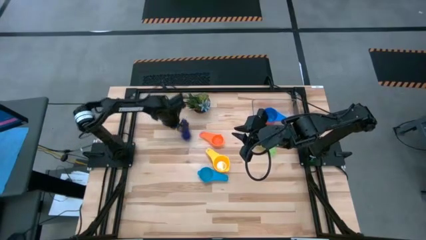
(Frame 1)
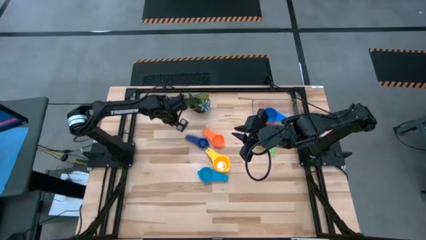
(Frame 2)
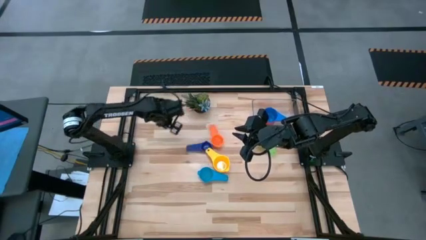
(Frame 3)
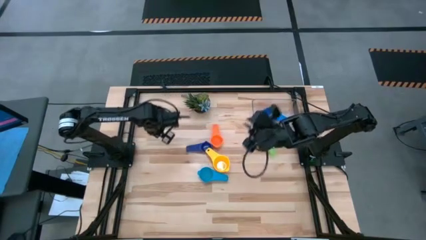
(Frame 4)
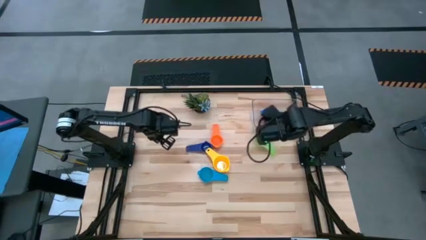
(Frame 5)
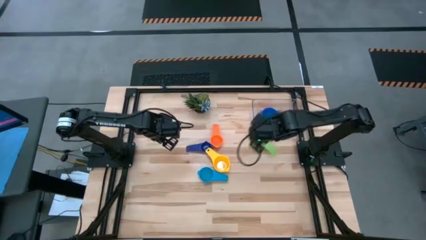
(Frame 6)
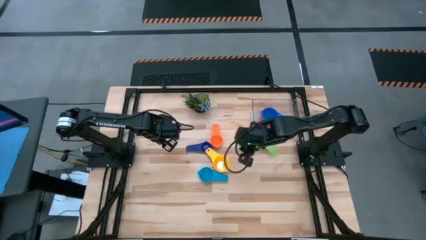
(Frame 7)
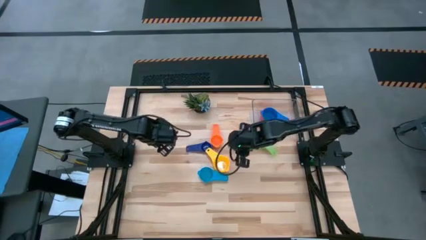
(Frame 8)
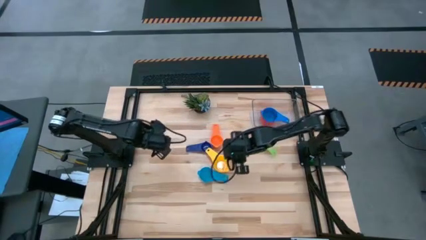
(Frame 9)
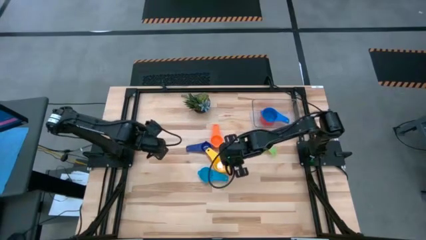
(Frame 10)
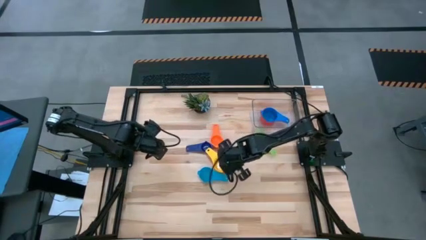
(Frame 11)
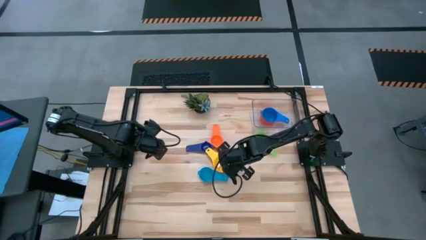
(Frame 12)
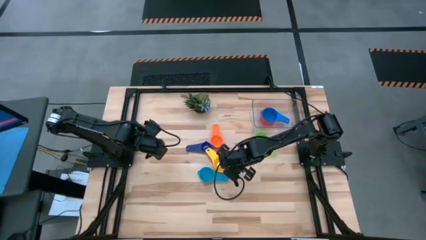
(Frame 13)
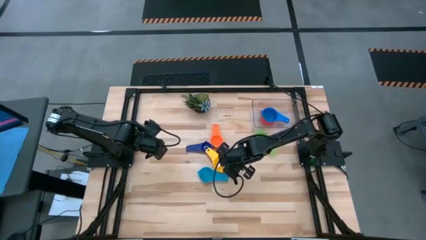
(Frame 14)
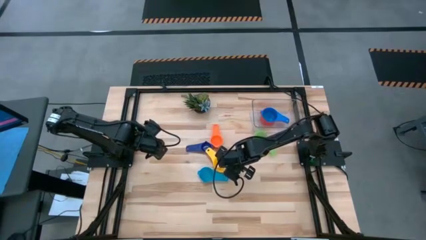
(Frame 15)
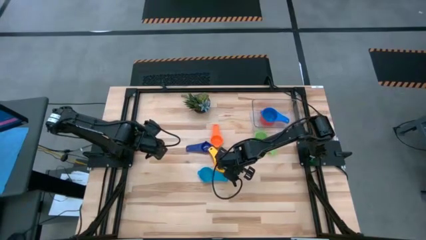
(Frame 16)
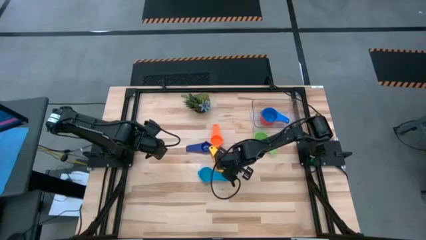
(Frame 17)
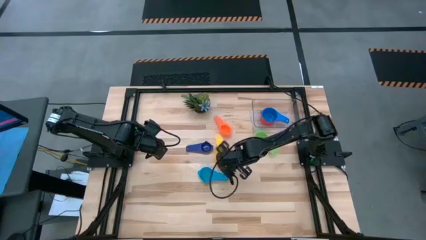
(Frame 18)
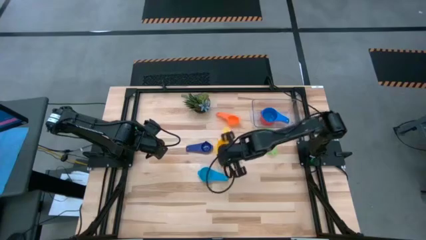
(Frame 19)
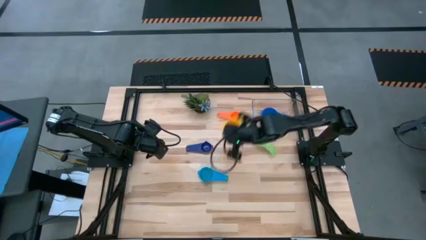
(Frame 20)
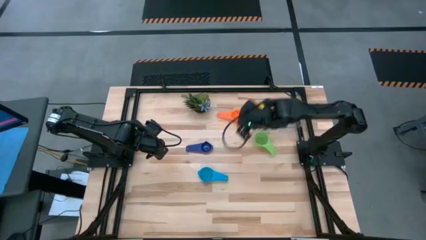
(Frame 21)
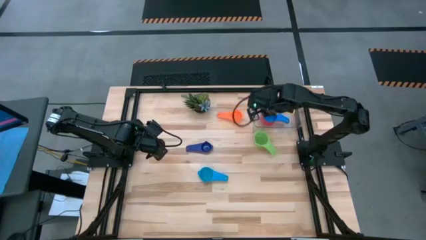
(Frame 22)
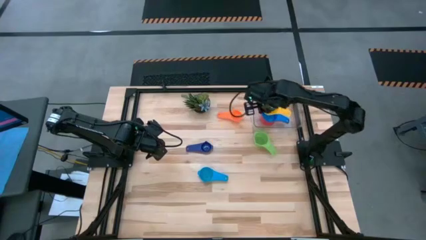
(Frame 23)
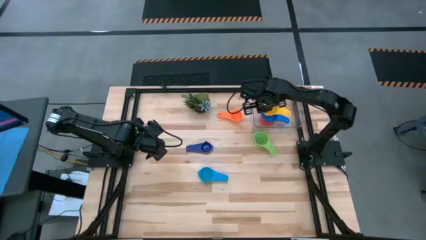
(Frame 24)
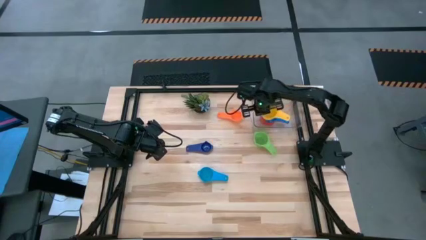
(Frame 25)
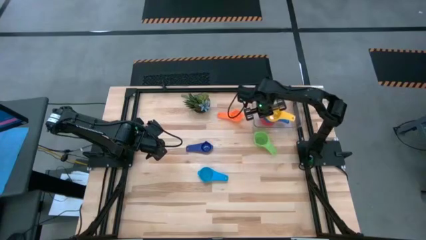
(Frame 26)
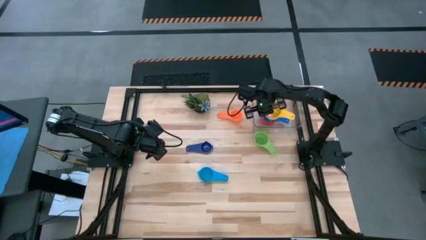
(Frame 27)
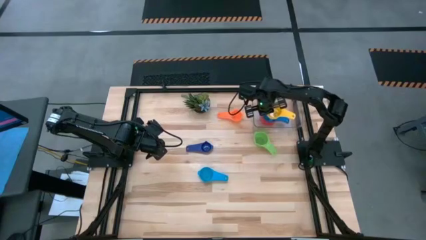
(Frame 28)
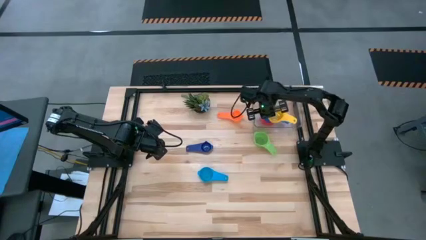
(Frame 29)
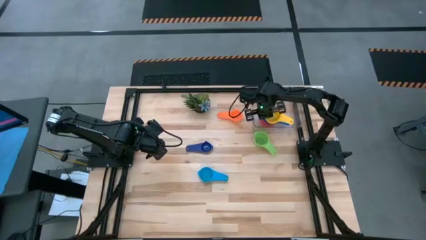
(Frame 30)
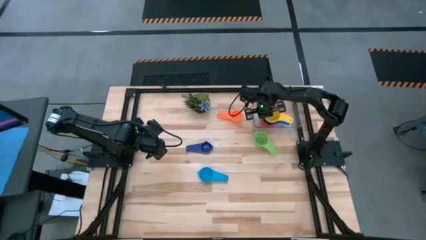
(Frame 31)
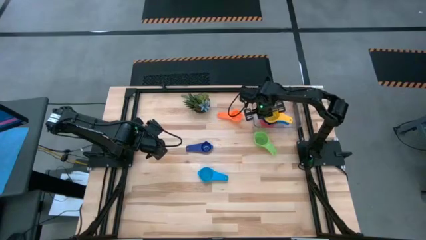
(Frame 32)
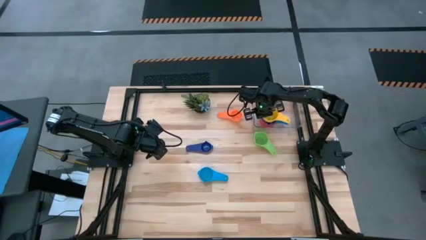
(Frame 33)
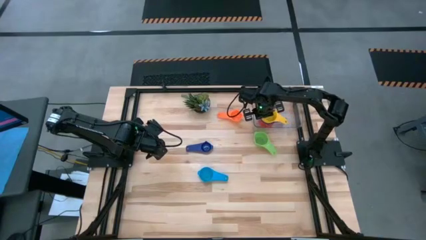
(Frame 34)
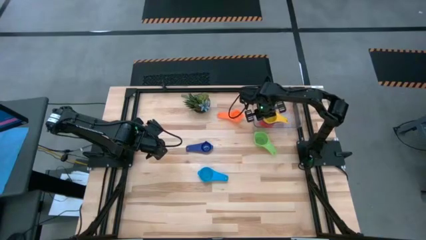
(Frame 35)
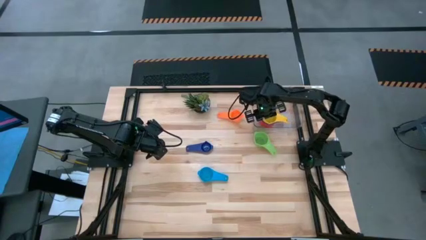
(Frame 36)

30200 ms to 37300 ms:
Task: Nest measuring cups in basket
Stack the yellow measuring cup on top of the blue measuring cup in the transparent bin

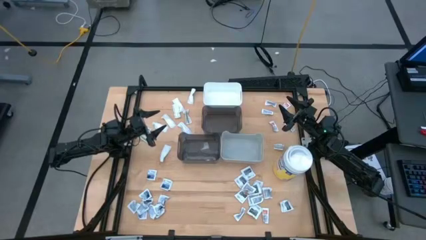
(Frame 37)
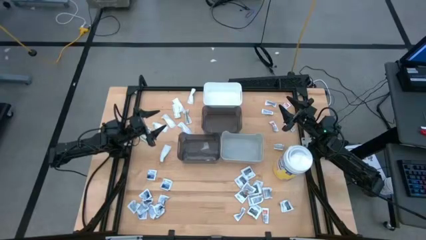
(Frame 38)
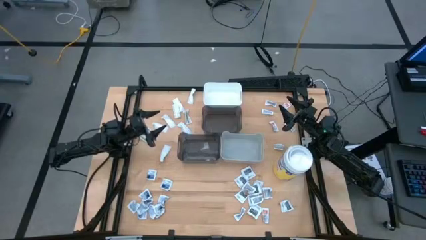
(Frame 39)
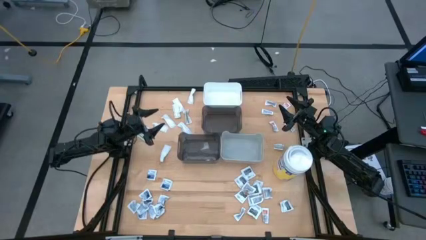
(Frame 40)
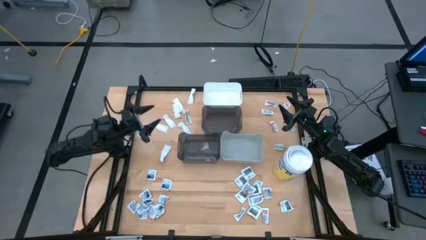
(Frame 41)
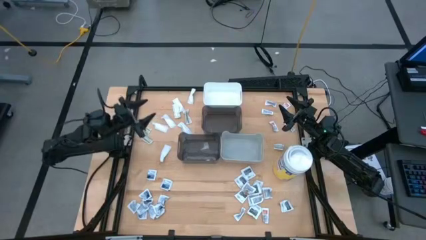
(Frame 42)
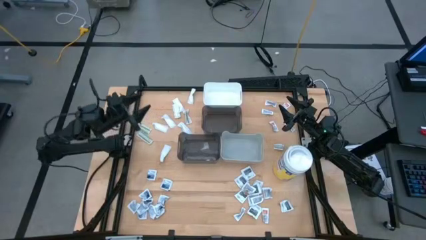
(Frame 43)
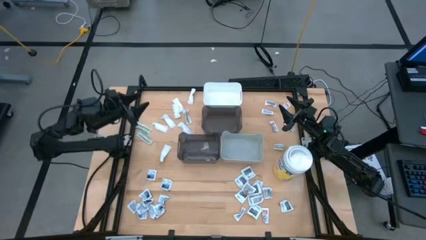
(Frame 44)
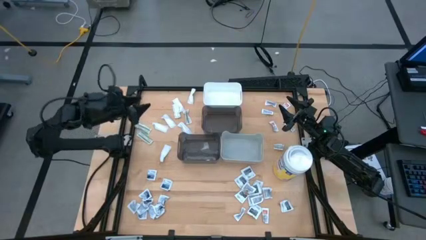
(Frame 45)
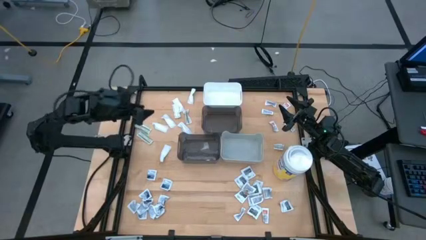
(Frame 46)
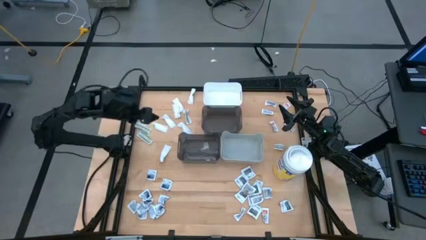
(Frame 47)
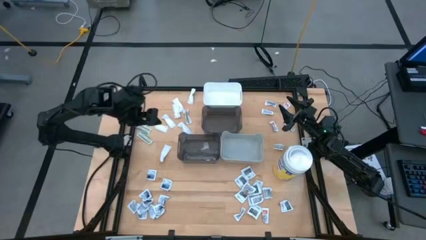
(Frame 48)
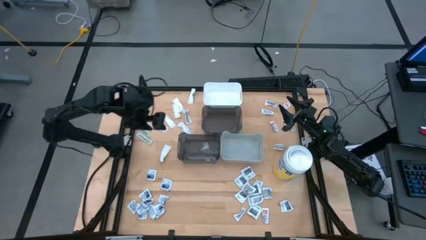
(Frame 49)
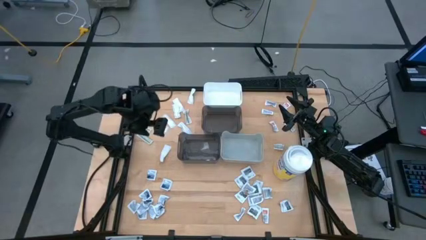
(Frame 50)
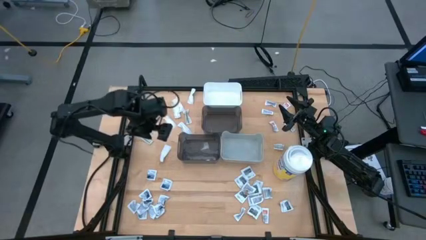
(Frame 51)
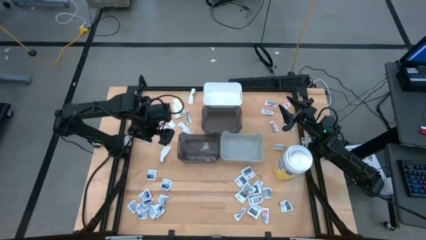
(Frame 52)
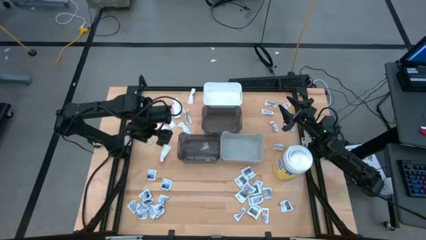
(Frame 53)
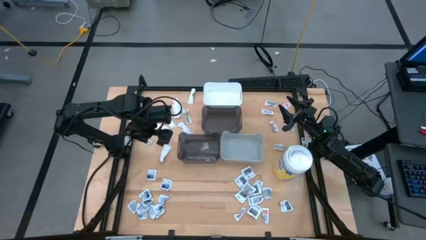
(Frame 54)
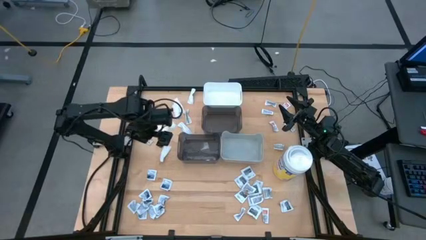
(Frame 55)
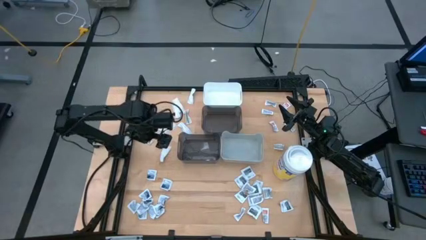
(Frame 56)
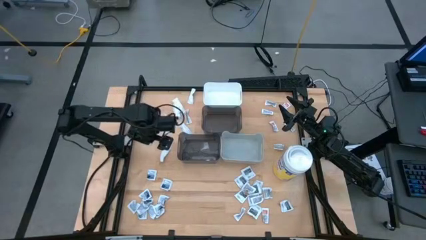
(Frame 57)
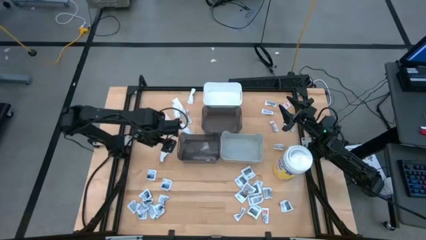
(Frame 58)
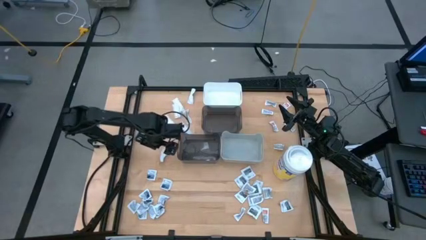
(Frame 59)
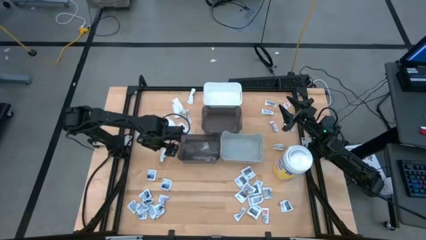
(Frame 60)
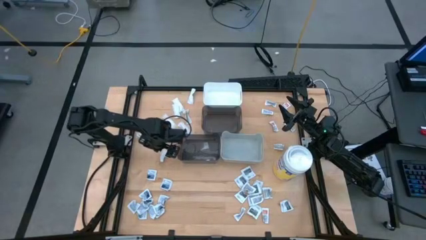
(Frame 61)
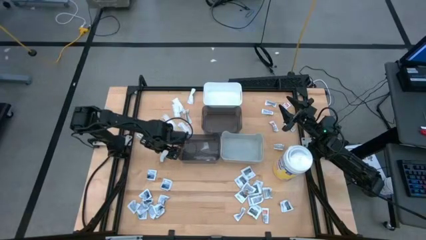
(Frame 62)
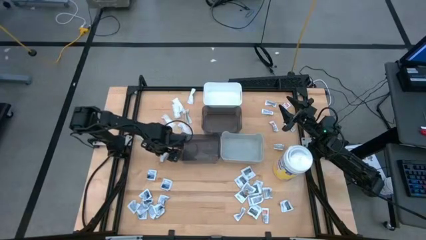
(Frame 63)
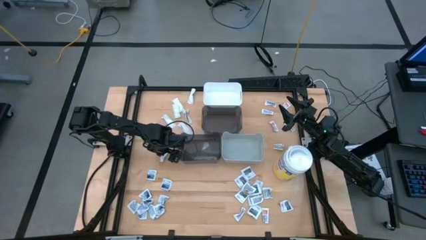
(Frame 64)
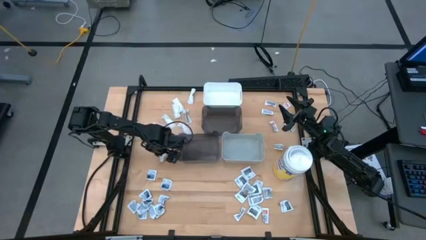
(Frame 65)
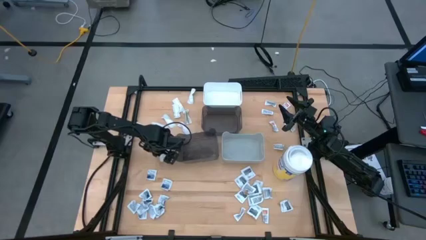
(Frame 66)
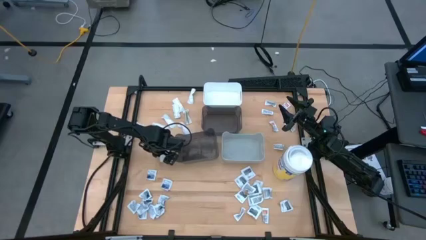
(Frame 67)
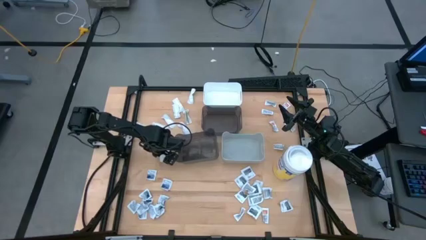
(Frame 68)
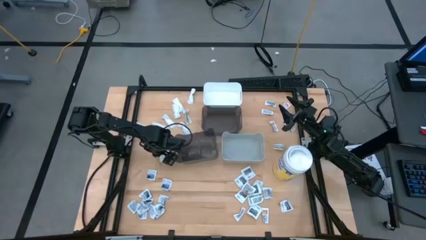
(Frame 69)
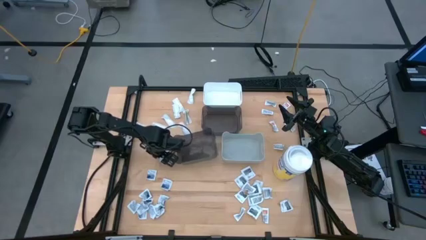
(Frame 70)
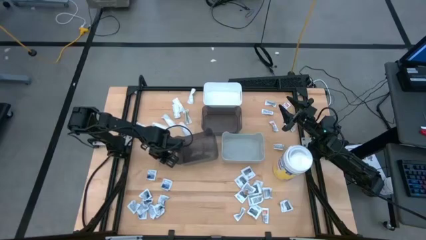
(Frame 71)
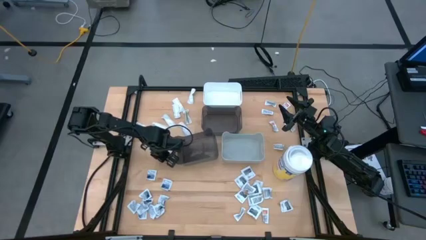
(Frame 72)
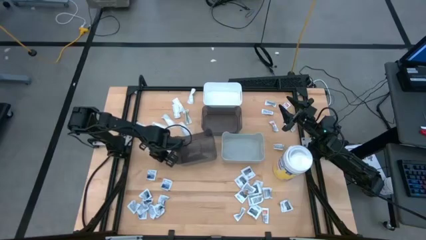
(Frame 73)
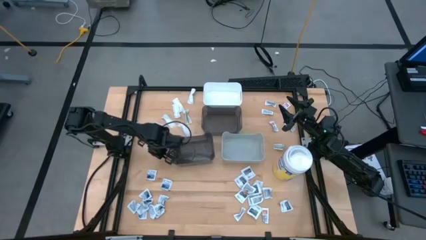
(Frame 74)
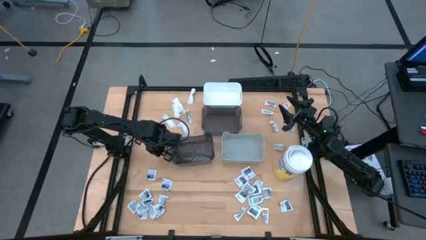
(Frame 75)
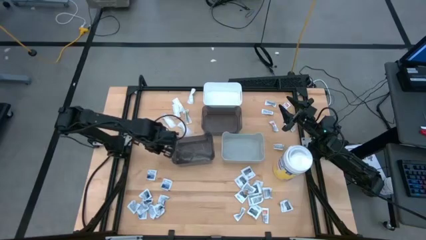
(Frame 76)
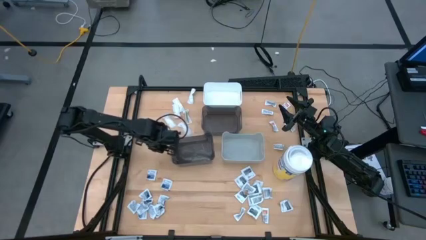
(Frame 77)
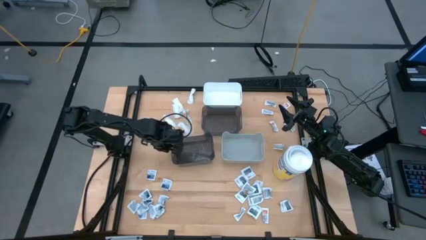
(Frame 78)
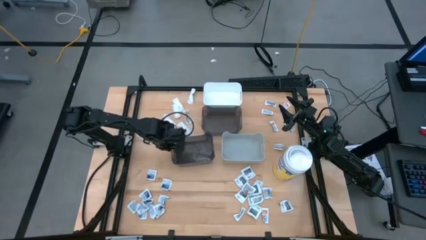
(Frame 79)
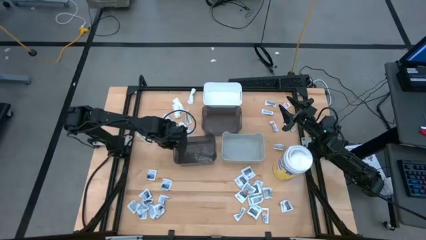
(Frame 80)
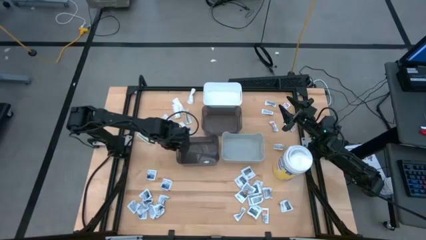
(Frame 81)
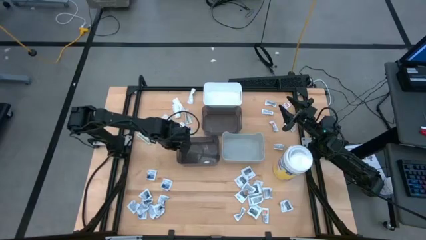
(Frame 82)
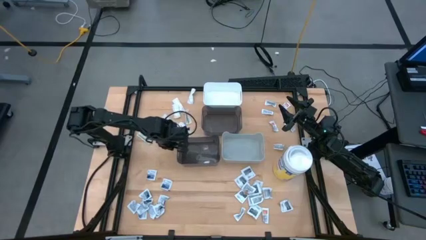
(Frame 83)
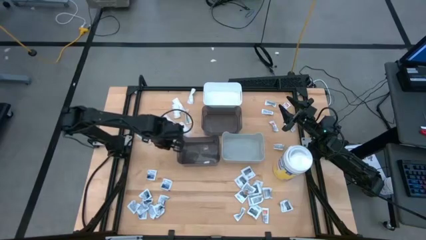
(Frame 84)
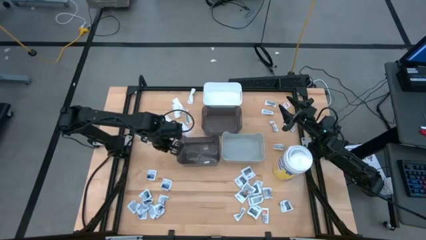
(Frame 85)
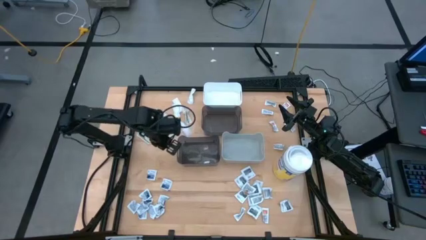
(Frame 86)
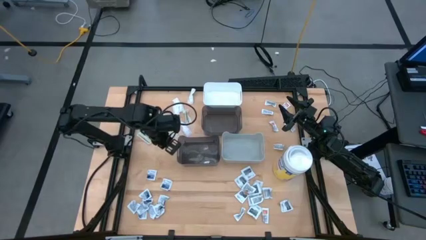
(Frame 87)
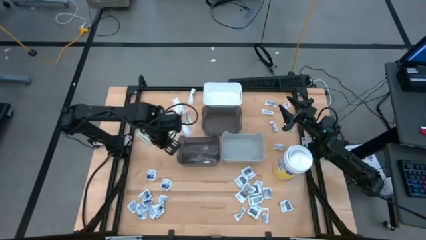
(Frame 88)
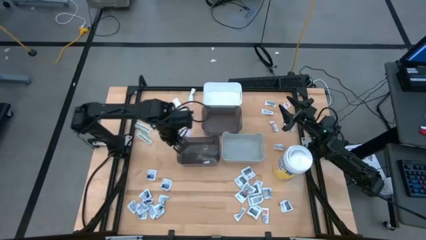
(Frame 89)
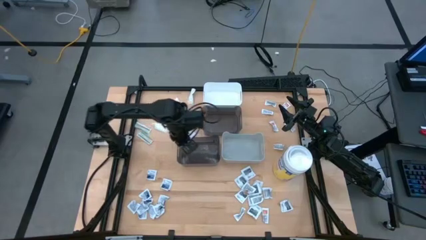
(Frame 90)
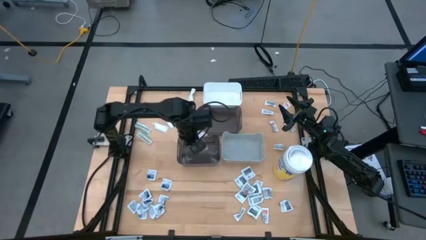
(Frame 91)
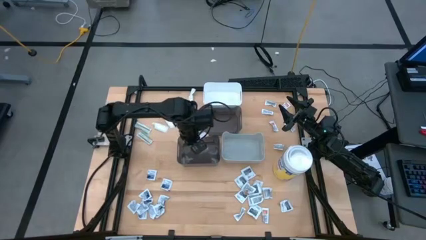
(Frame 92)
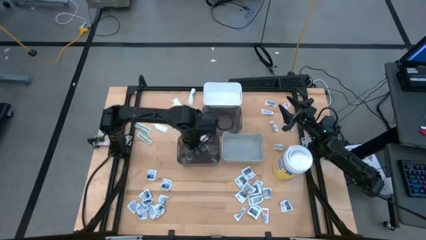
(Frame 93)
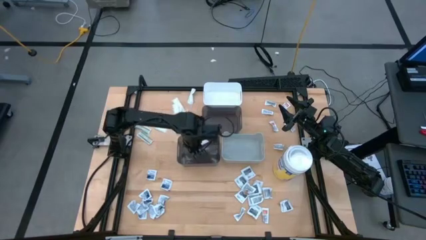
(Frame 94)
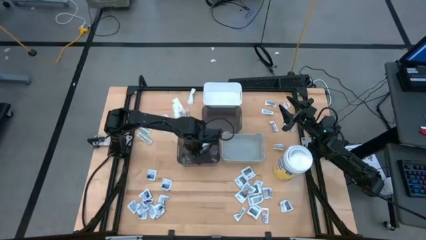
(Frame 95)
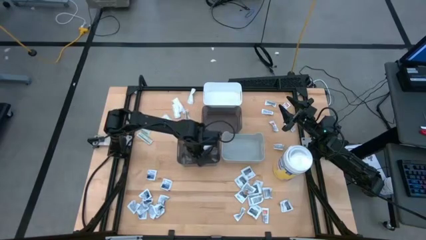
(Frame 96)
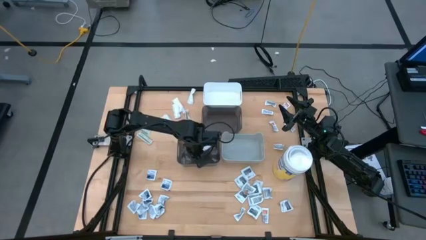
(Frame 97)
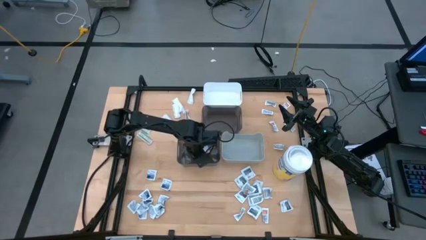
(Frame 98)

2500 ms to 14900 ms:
Task: Pick & Place First Aid Supplies
Put the white bandage into the bottom black bin
